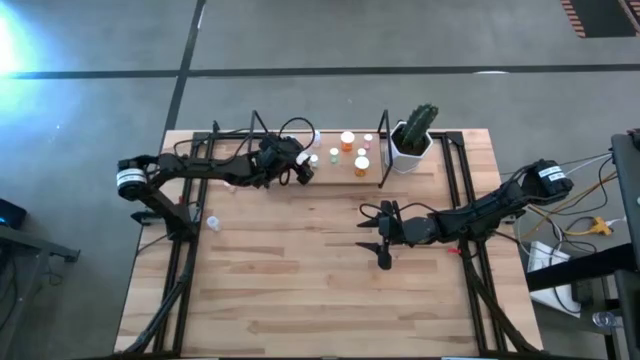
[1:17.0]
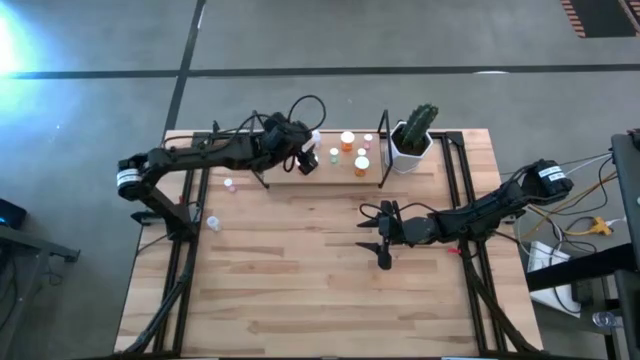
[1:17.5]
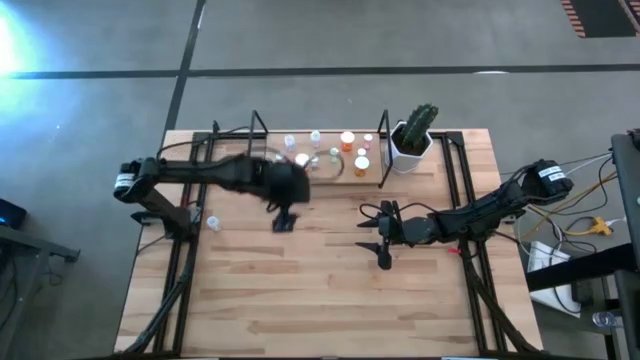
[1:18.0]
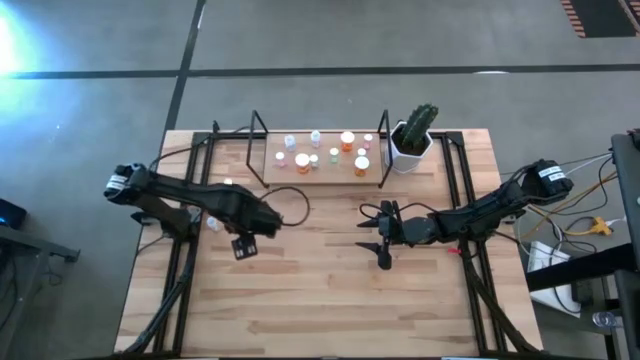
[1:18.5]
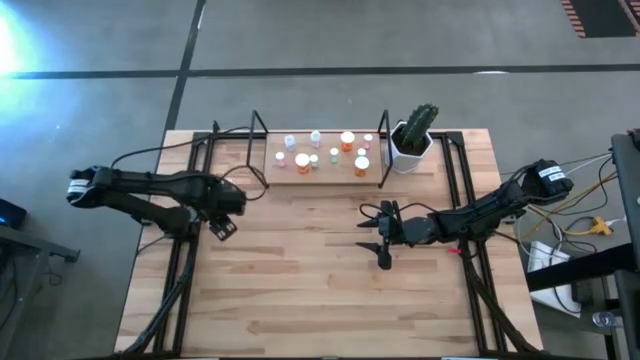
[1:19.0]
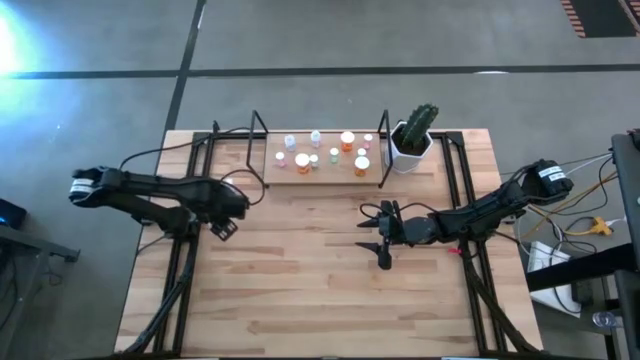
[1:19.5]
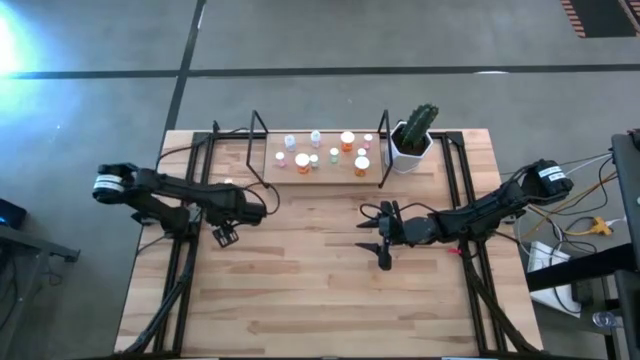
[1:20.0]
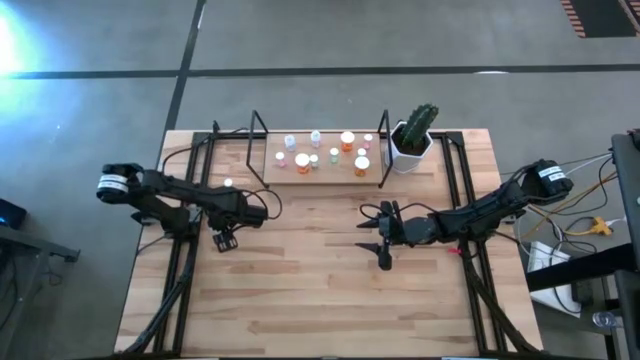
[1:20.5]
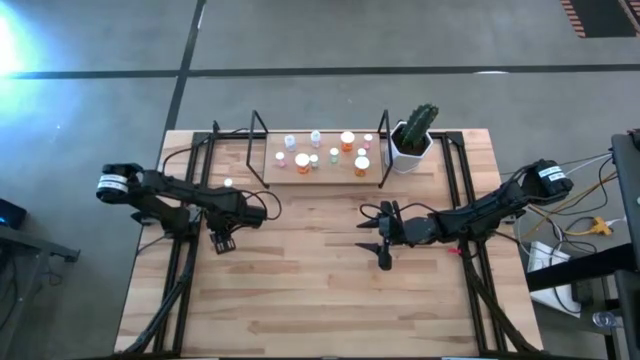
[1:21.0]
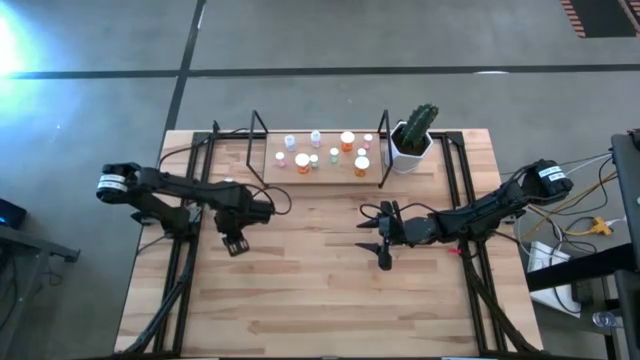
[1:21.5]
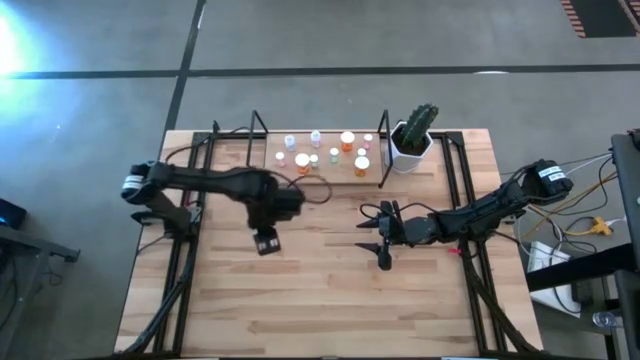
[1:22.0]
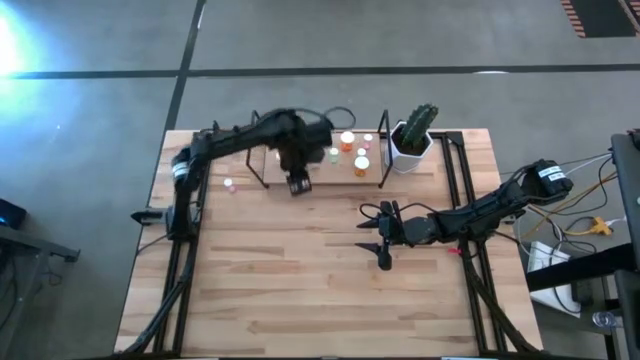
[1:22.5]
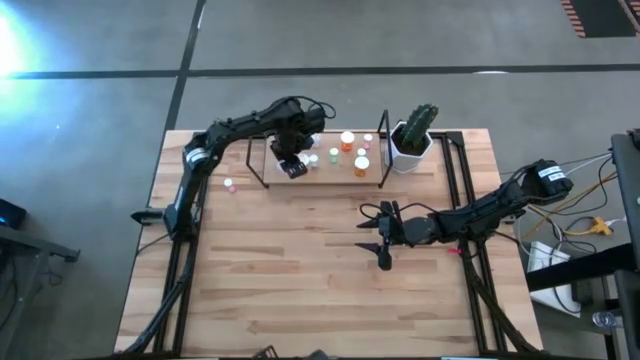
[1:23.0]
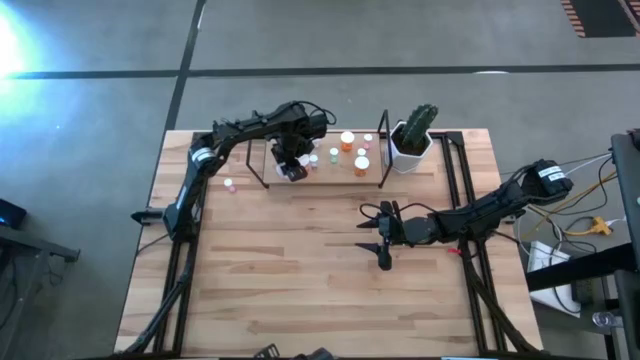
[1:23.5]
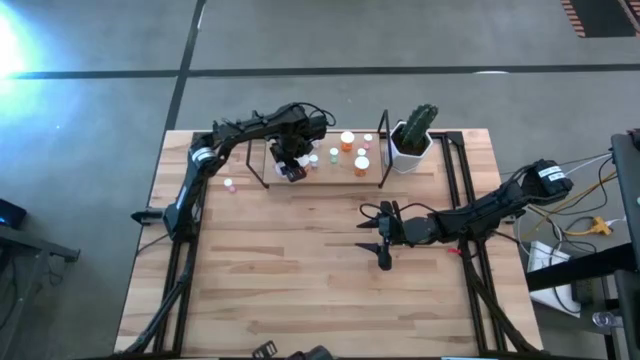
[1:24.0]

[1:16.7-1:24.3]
Task: Pick and place medicine bottles onto shelf by color
Put the transparent medicine bottle on the shelf

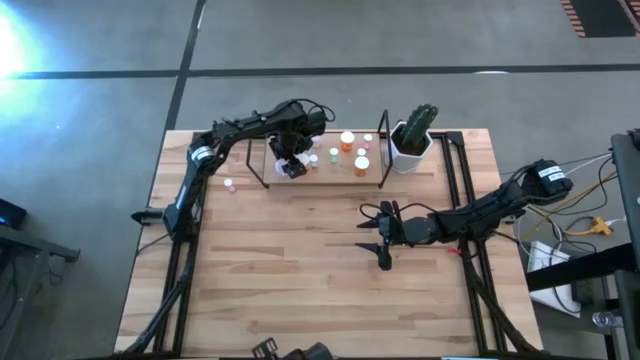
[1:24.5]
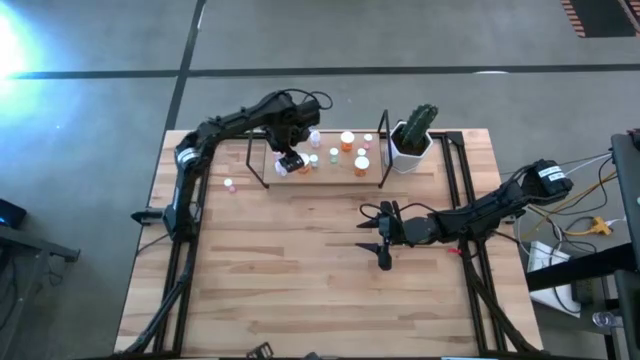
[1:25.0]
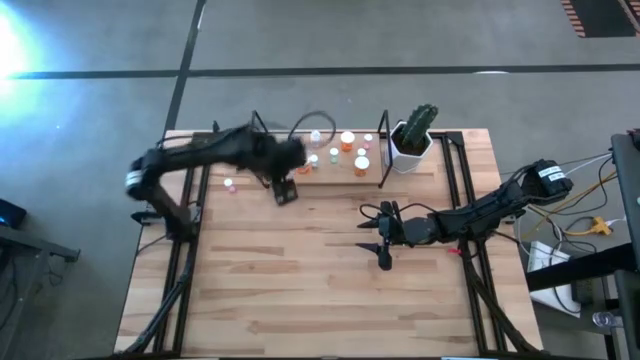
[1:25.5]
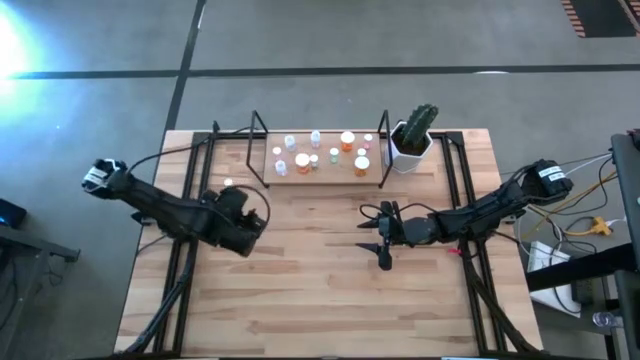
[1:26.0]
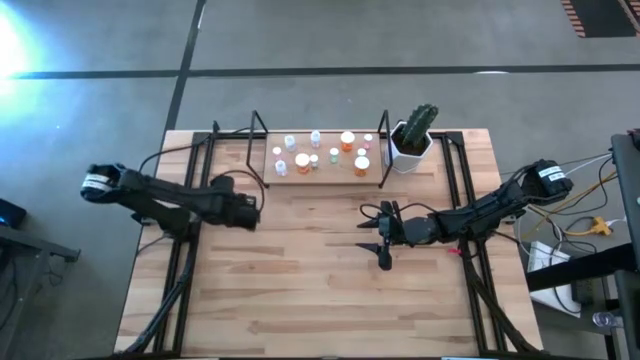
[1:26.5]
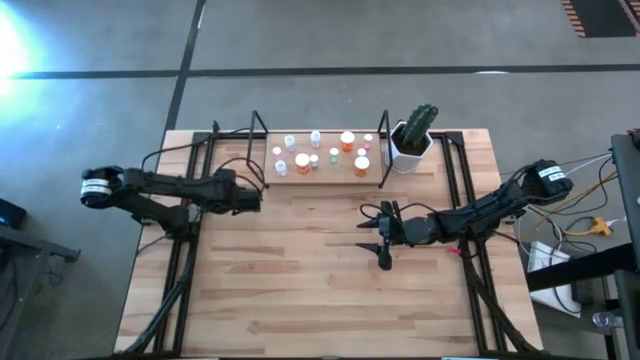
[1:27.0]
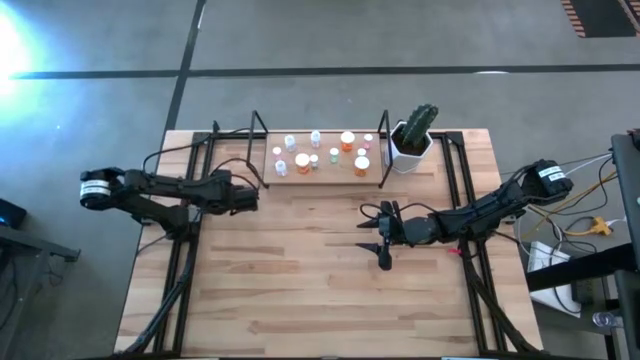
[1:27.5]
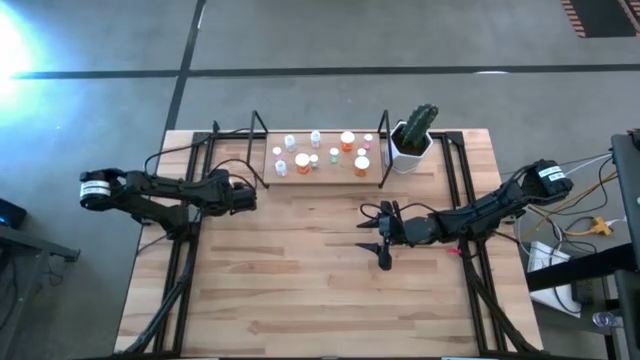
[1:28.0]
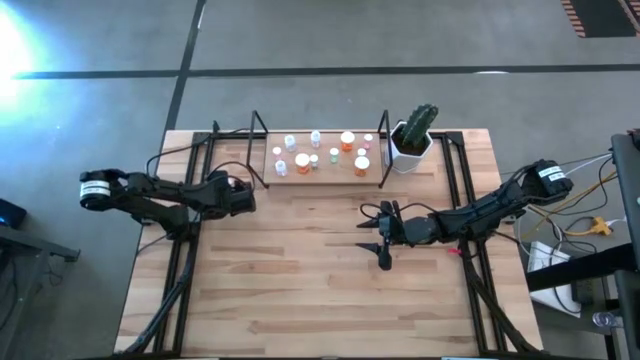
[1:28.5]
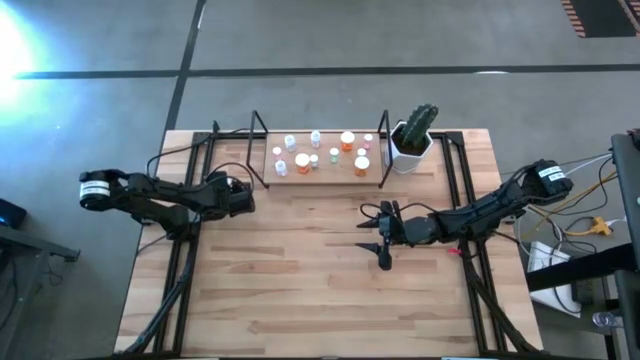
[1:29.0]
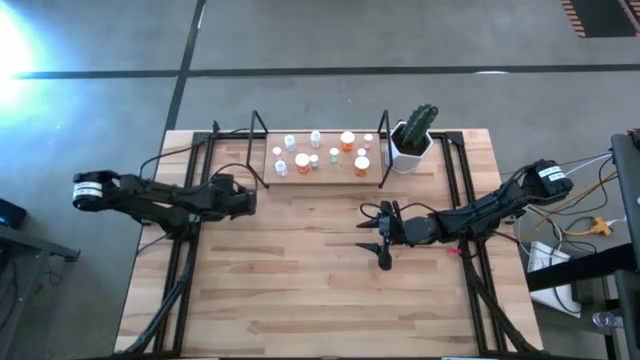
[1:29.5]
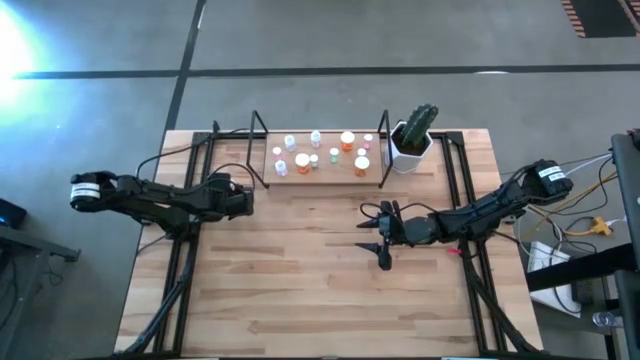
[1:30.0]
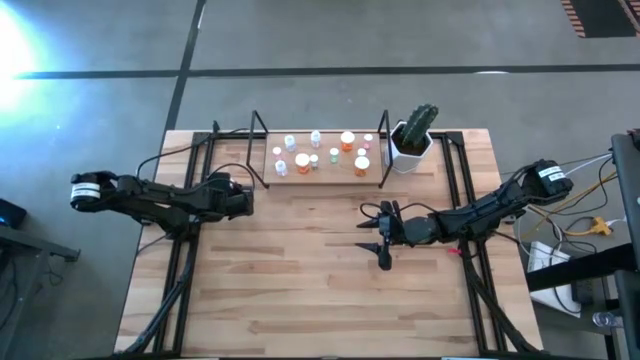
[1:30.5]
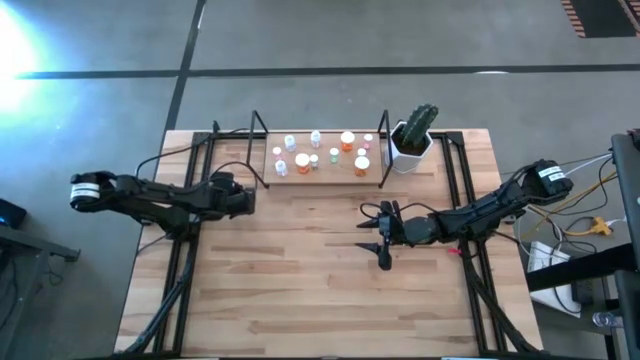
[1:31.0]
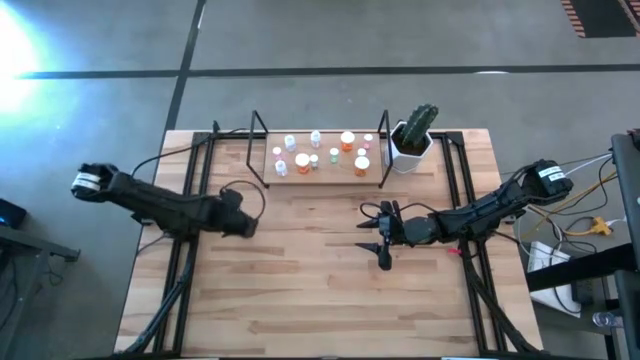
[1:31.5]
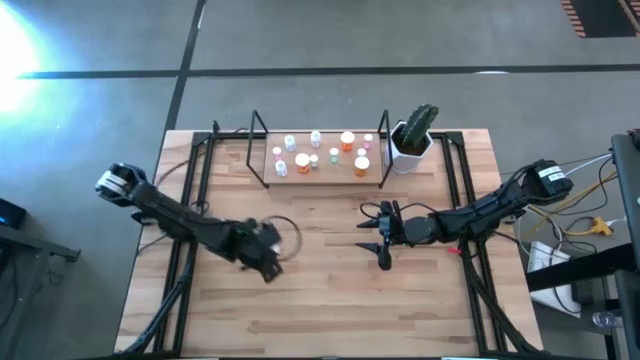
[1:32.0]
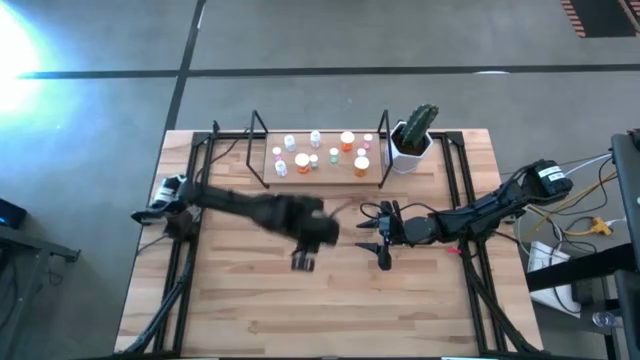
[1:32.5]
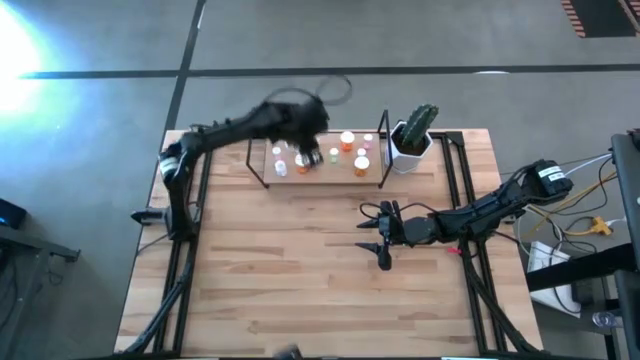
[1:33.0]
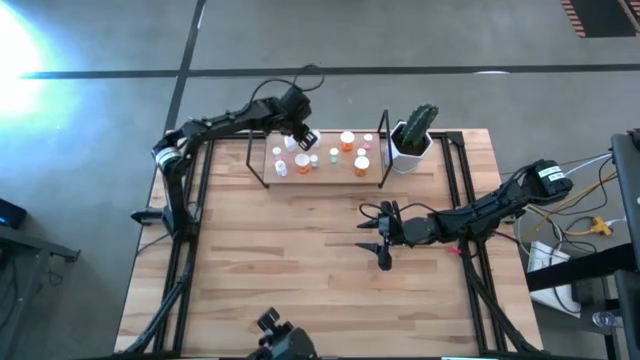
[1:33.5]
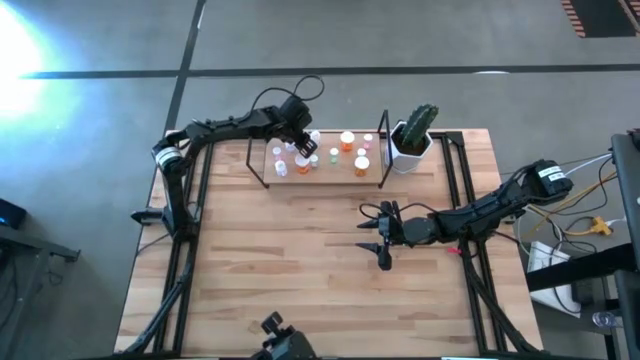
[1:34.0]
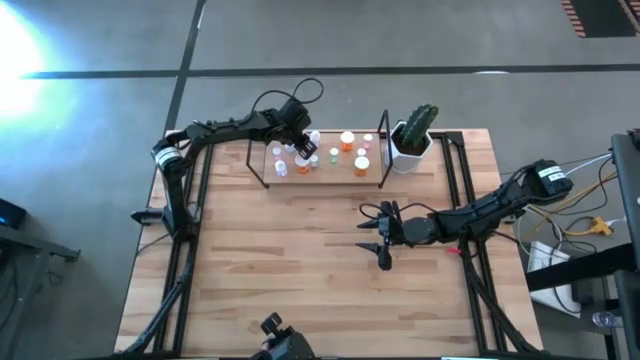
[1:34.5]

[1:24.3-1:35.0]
Put the pink medicine bottle on the shelf

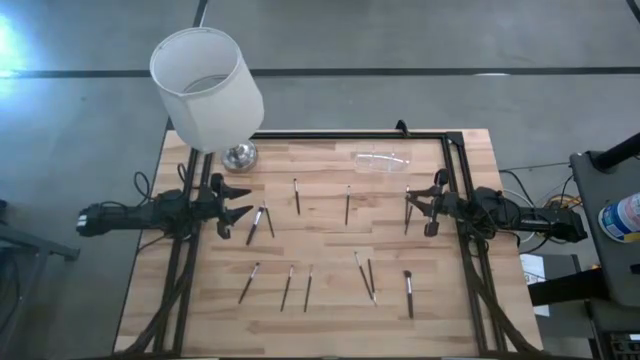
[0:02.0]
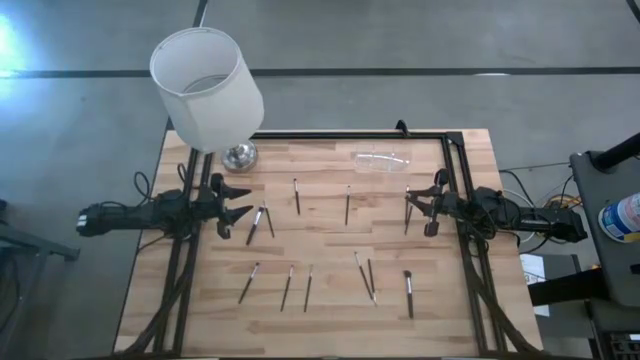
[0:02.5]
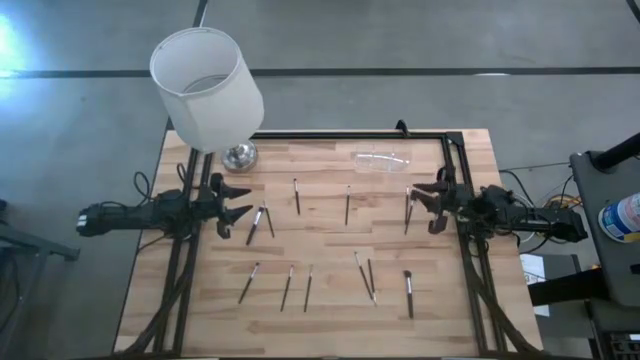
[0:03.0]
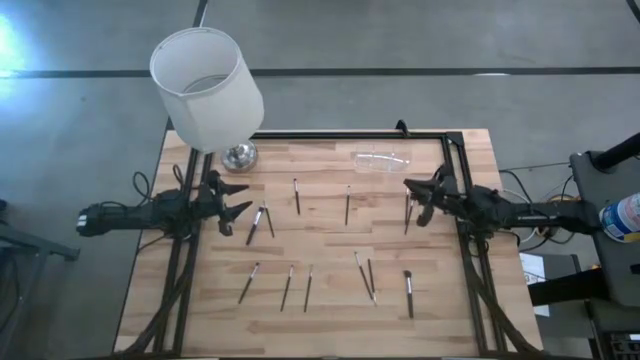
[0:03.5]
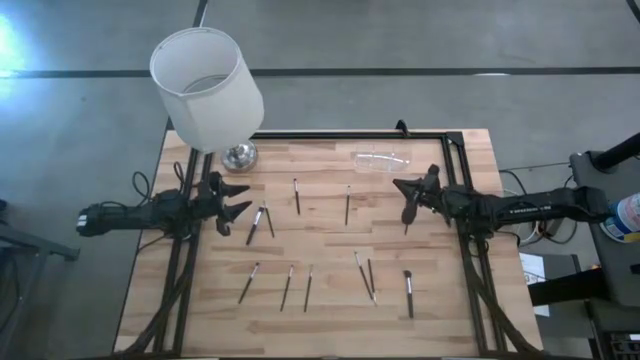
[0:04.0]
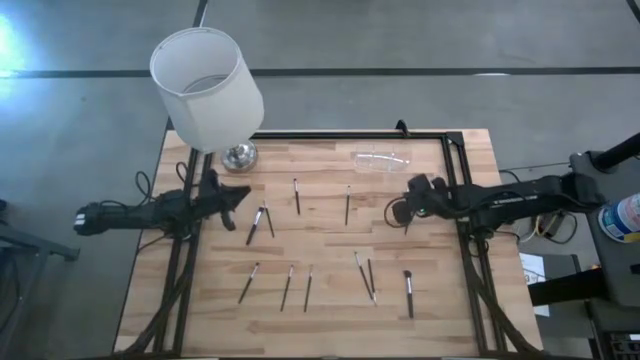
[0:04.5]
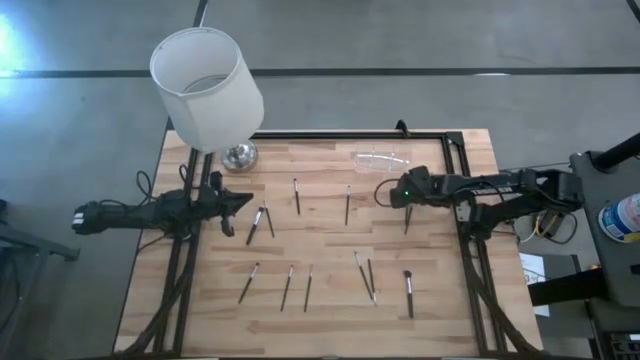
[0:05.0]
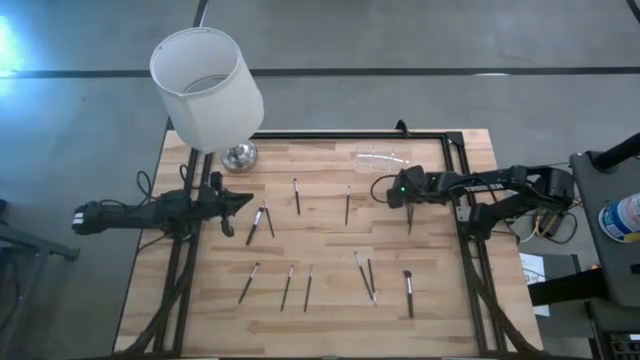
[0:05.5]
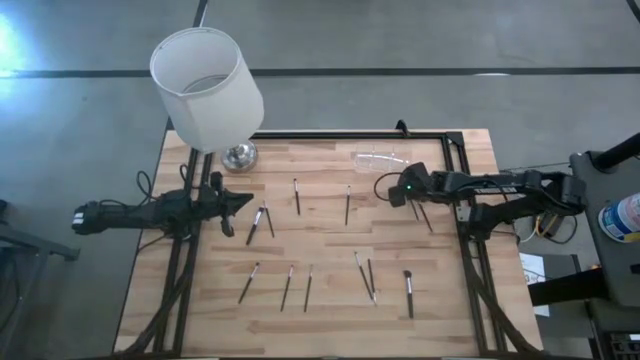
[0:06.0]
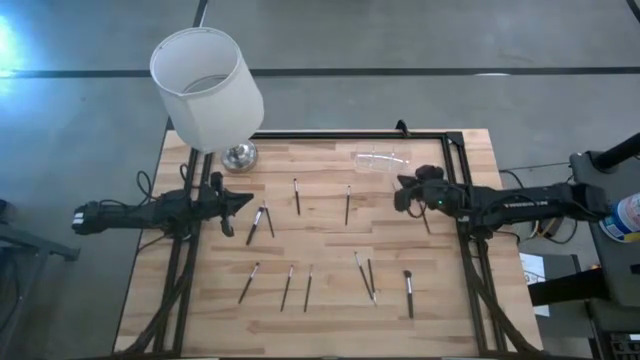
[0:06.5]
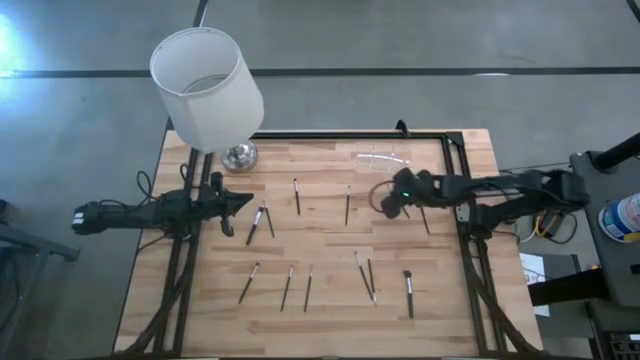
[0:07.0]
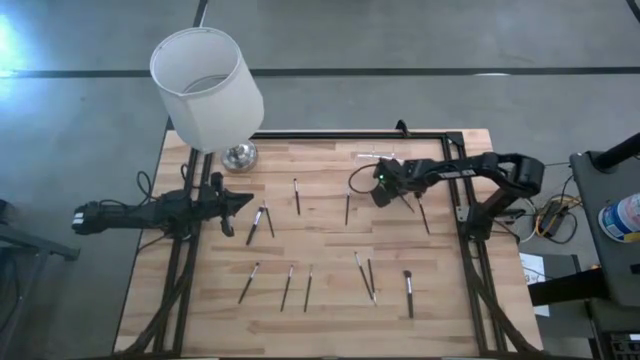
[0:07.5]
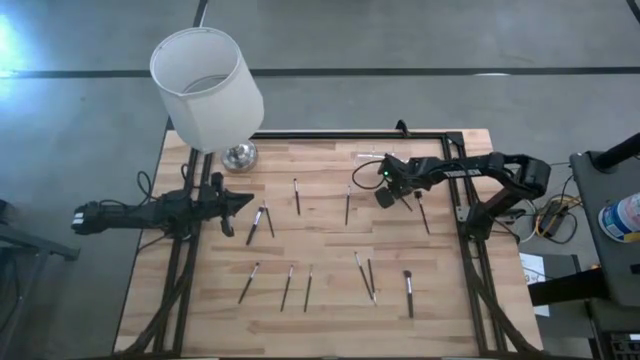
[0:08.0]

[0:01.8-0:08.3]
Task: Put items in baskets/containers
Put the eyeshadow brush into the transparent organizer
